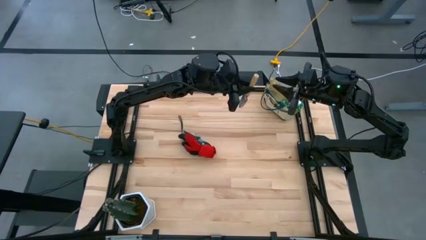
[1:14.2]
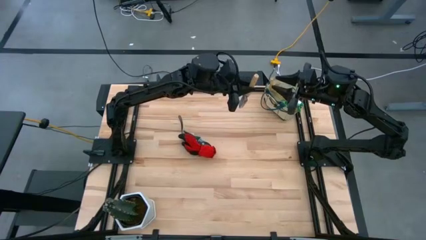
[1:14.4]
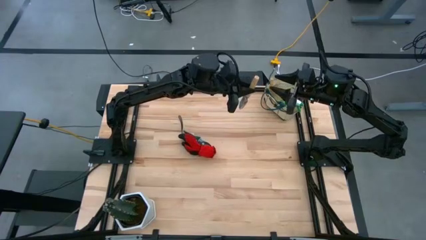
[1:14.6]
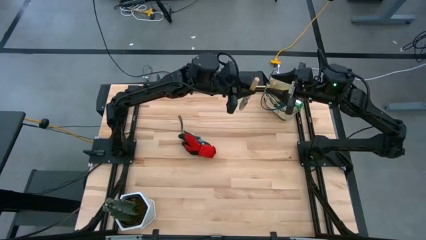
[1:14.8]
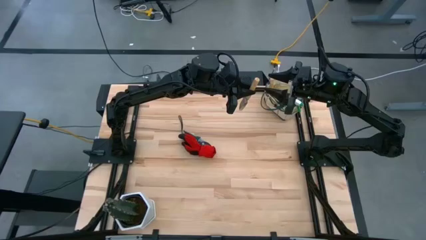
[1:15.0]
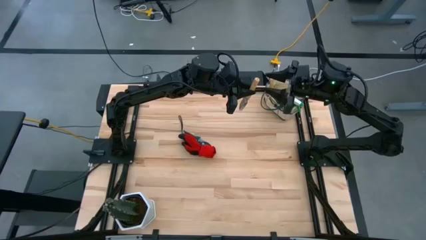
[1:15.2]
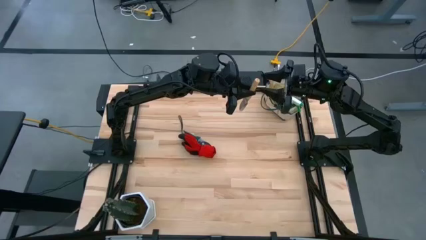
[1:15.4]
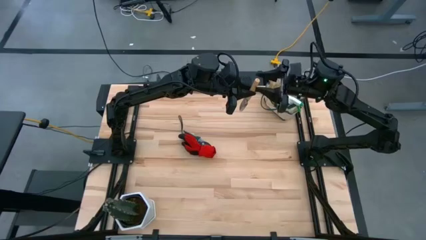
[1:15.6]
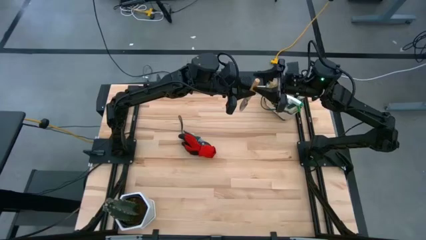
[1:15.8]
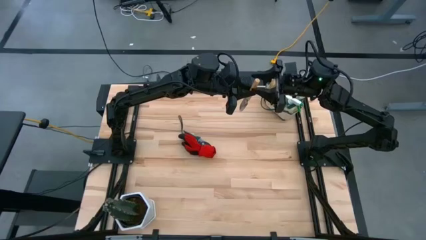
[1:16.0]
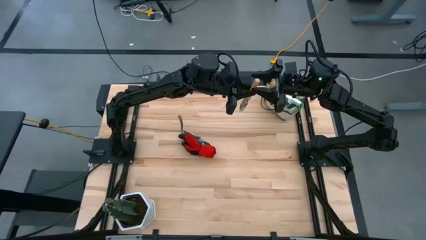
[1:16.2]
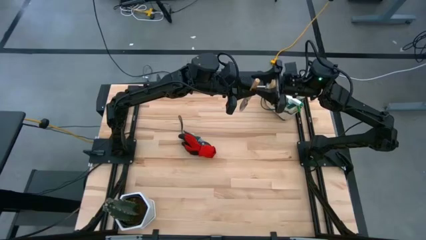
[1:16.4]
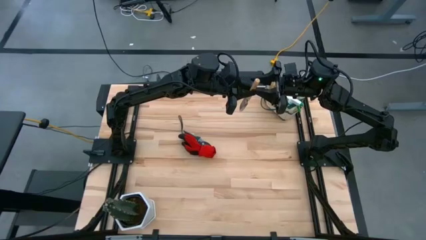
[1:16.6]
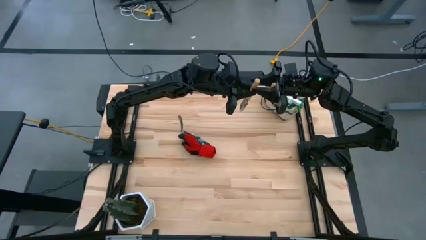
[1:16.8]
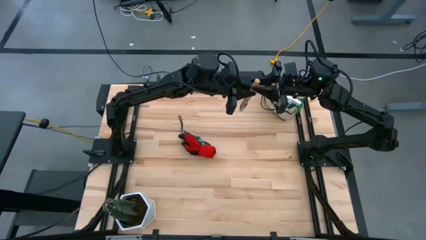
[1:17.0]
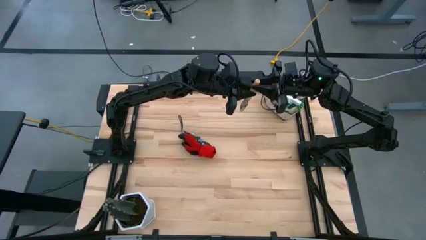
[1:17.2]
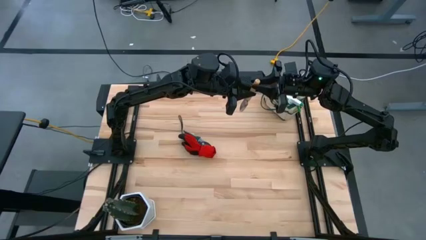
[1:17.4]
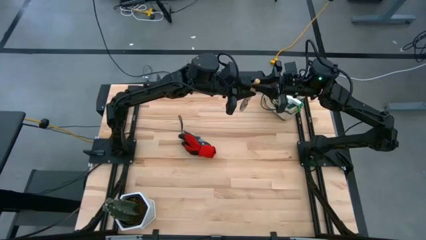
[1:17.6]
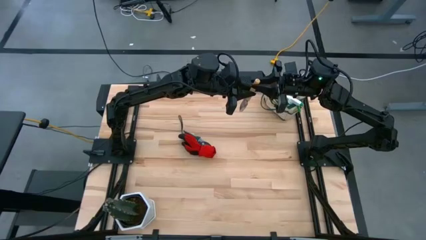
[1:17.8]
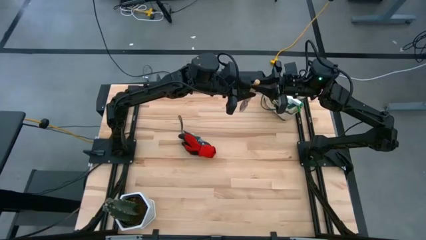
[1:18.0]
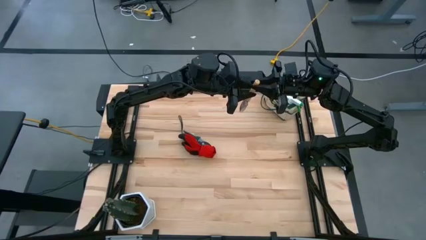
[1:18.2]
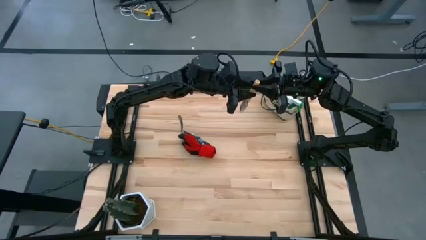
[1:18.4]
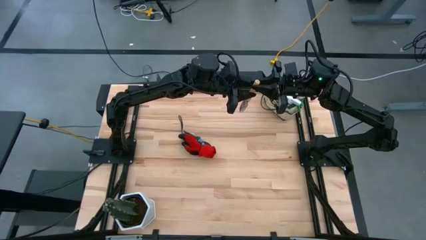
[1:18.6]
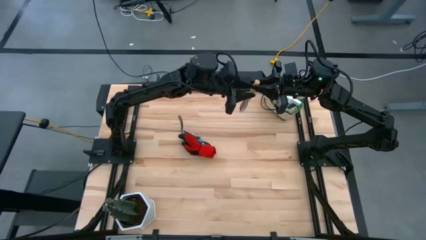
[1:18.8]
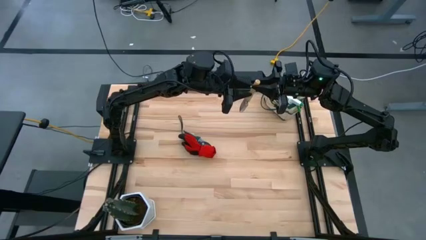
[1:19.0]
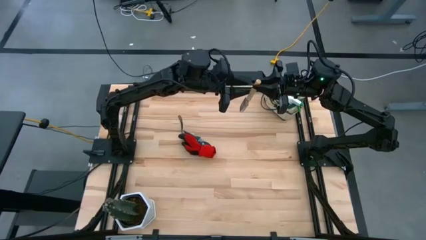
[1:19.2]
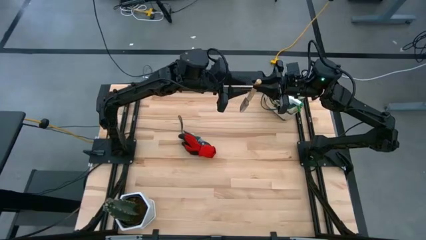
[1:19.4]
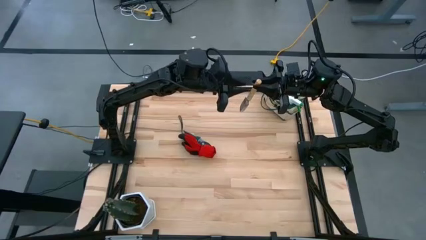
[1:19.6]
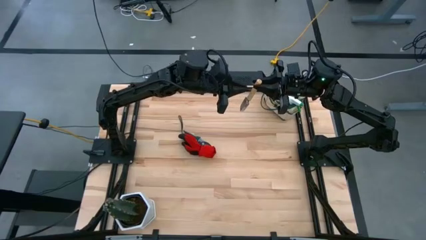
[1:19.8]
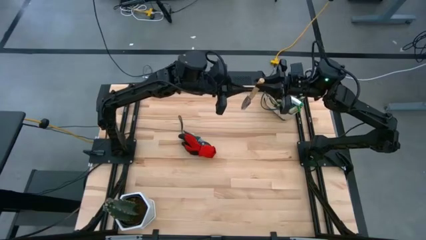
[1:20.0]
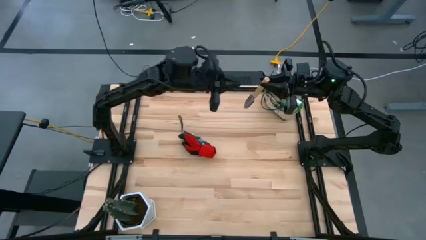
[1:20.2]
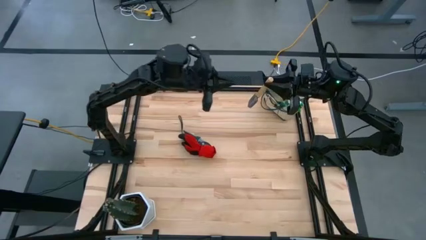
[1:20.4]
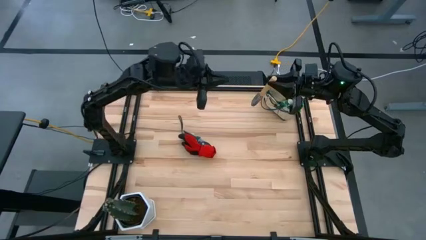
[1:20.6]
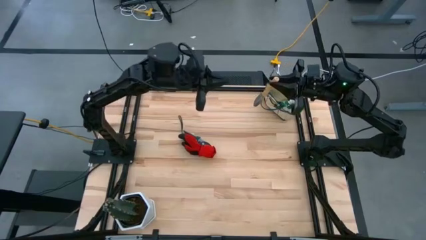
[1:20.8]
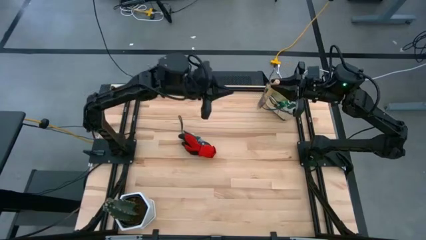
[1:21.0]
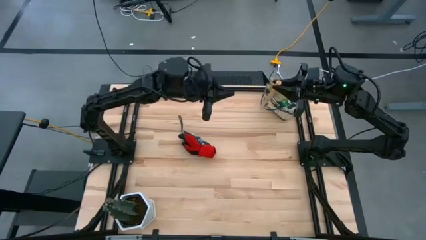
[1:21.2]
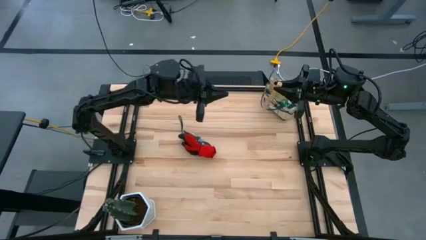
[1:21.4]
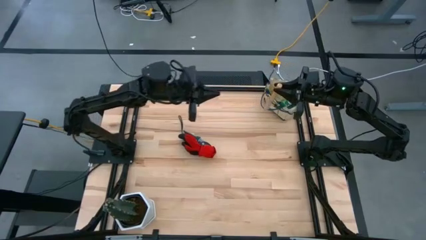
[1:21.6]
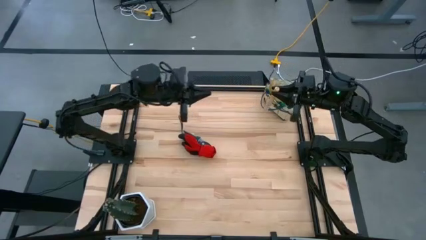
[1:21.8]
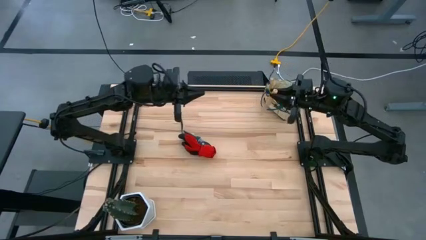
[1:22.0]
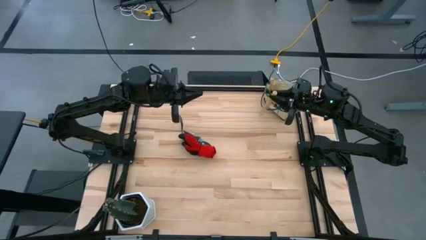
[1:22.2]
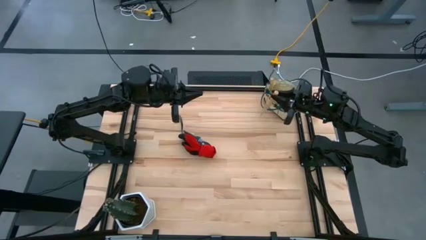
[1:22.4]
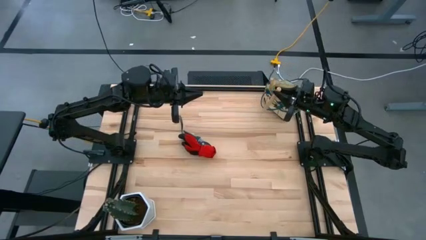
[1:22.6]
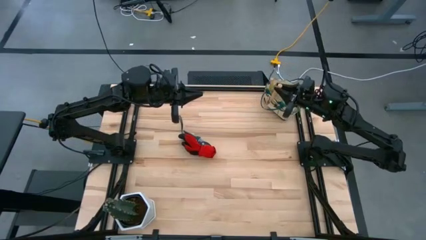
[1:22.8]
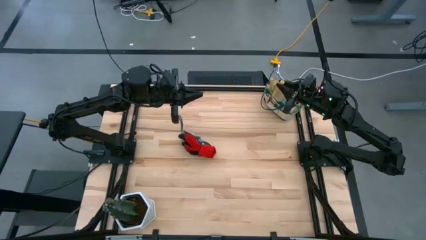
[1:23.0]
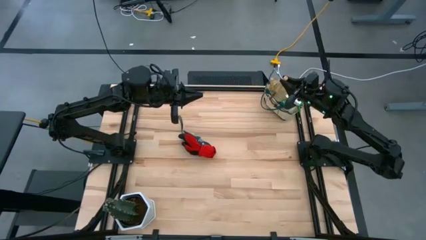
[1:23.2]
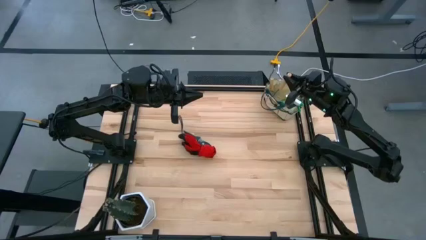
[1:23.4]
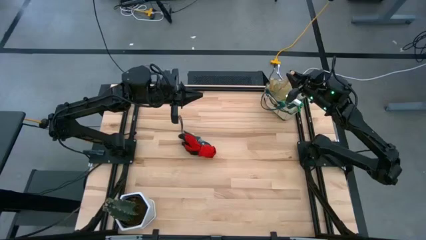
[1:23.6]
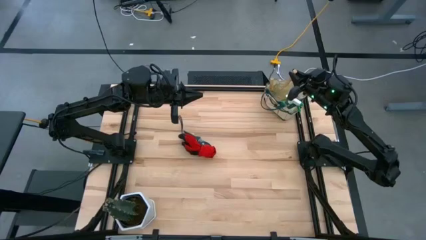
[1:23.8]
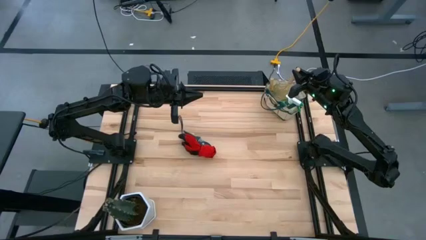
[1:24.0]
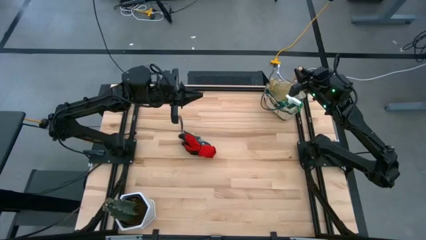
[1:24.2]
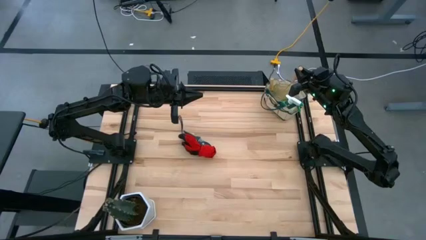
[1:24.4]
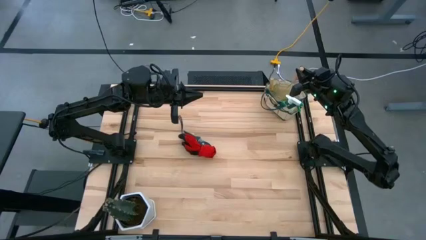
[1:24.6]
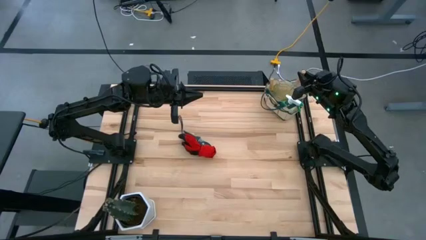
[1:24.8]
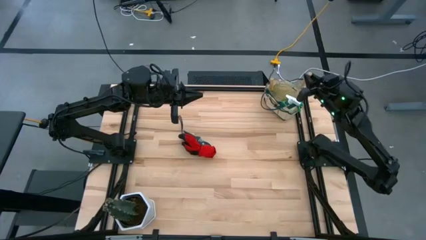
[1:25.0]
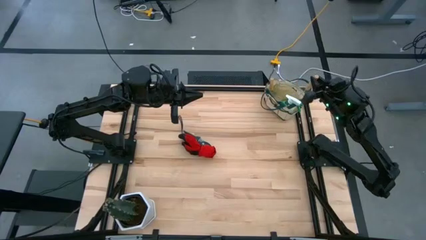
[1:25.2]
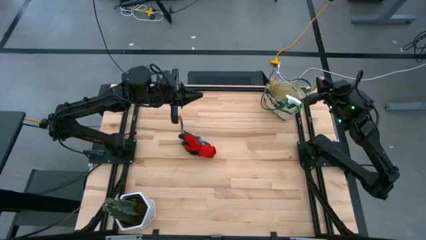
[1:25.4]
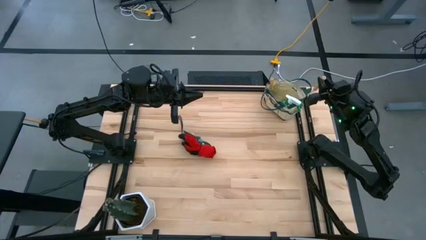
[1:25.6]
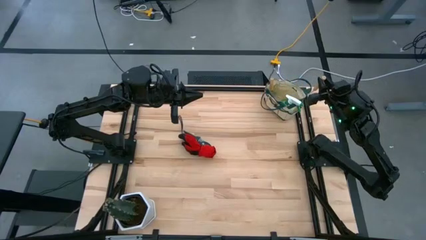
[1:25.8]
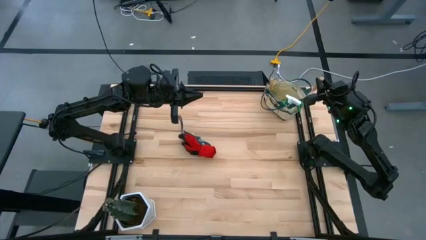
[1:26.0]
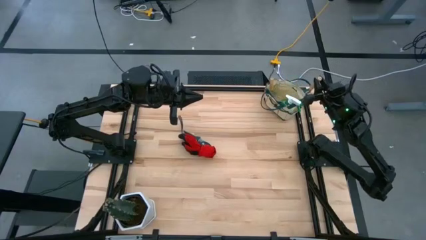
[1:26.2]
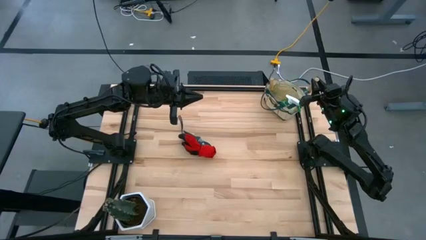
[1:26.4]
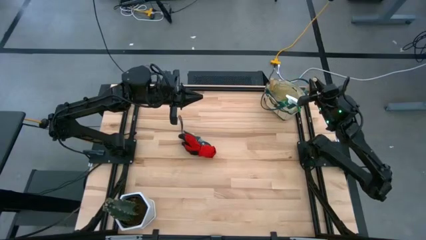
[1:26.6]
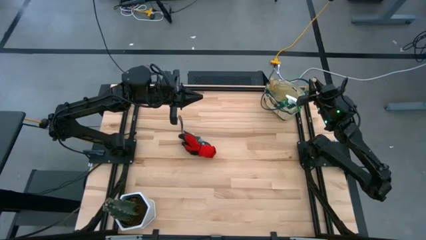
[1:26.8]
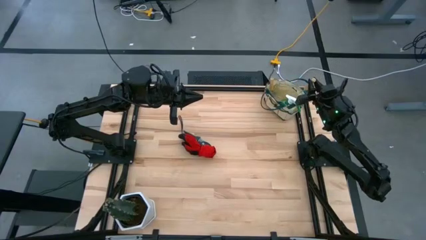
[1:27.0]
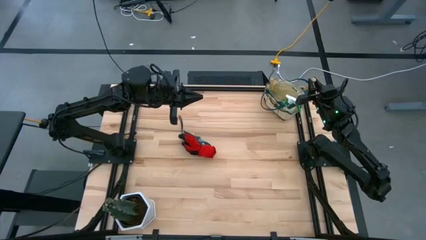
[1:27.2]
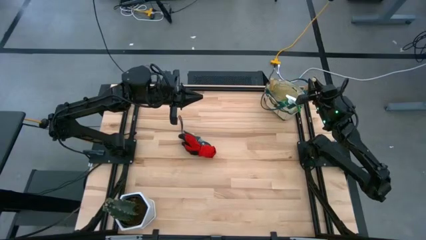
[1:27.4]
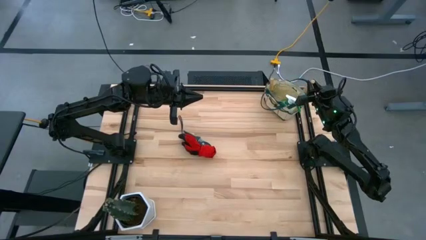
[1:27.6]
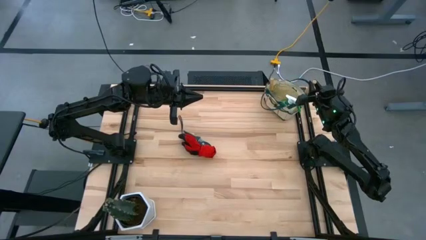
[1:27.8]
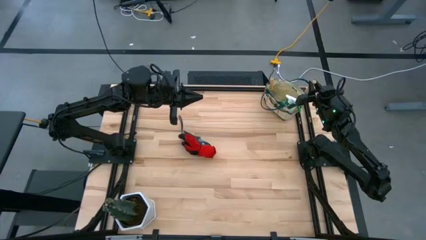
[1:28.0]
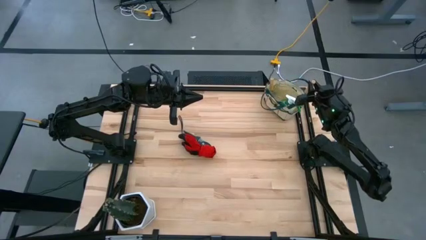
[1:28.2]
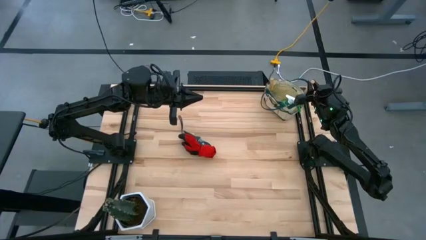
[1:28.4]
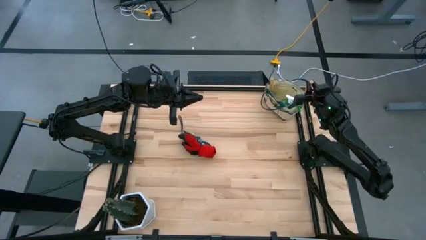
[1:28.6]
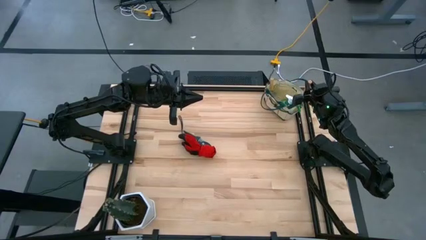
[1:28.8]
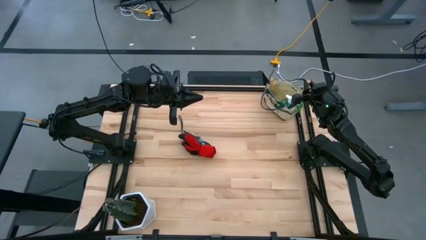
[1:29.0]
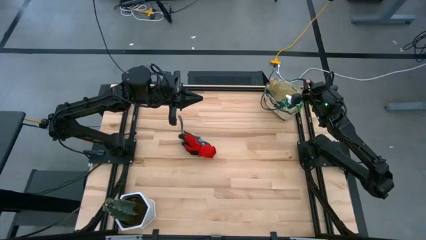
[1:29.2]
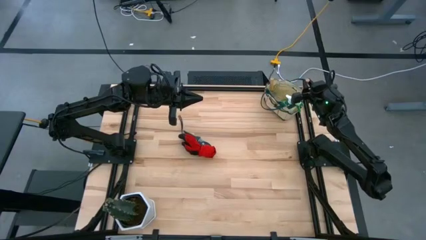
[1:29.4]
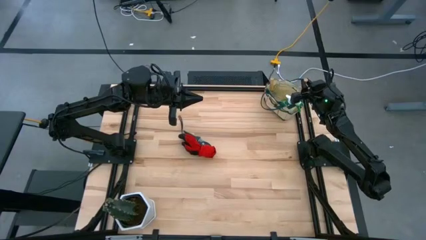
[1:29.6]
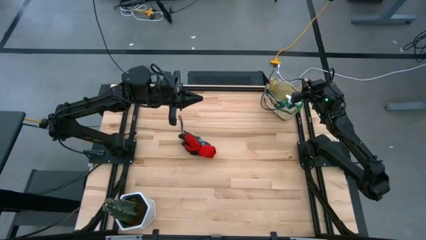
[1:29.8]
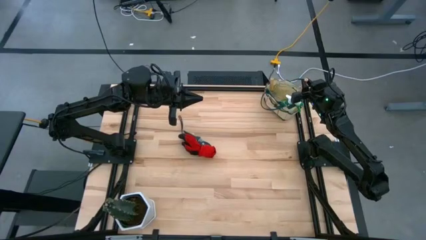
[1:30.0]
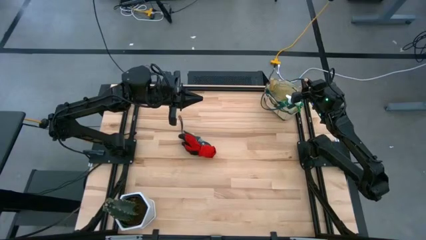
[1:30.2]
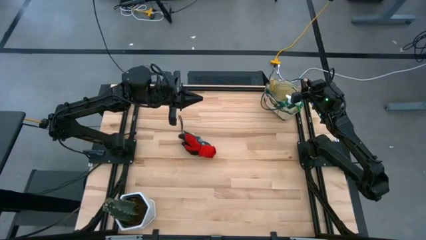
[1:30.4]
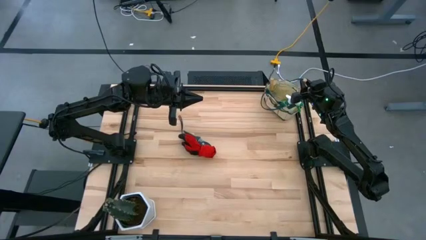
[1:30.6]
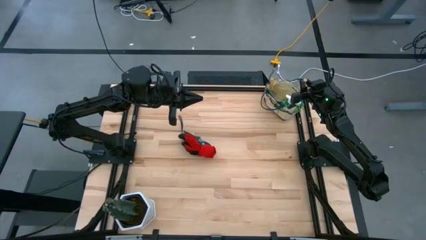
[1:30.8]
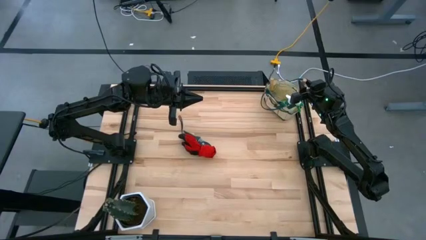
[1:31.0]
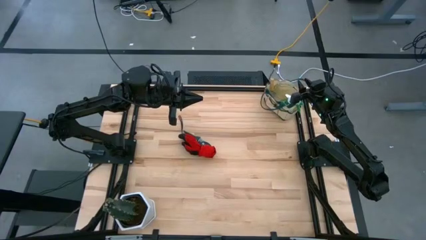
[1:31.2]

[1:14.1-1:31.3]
Task: Pick & Place Garden tools in Gardening bag
Put the brown trowel into the gardening bag
